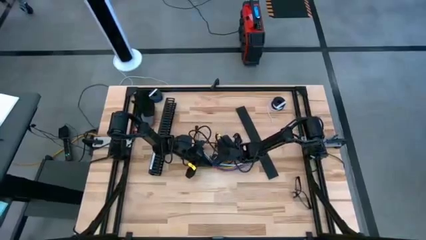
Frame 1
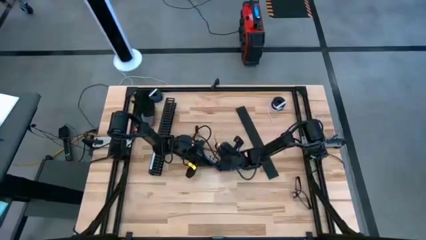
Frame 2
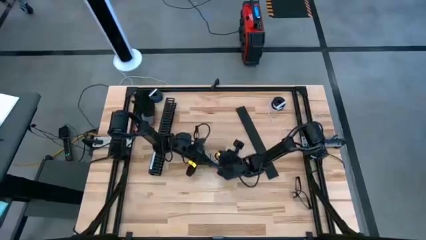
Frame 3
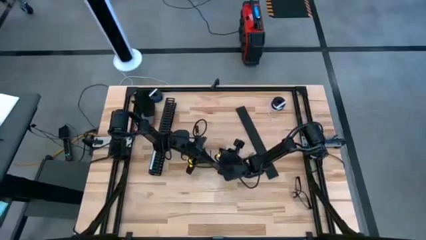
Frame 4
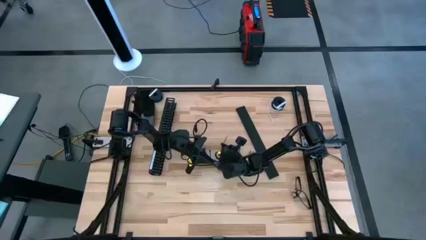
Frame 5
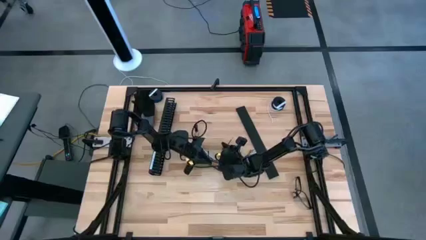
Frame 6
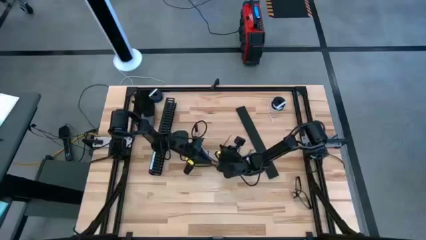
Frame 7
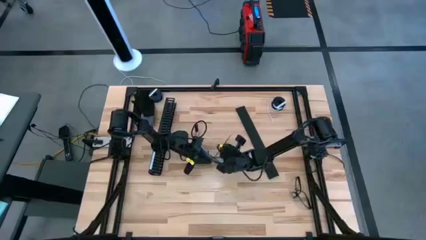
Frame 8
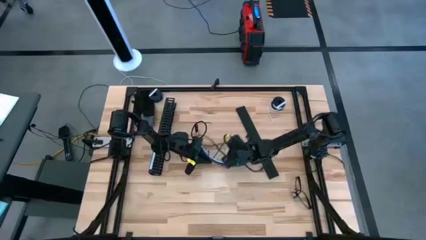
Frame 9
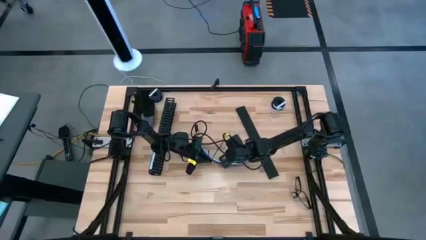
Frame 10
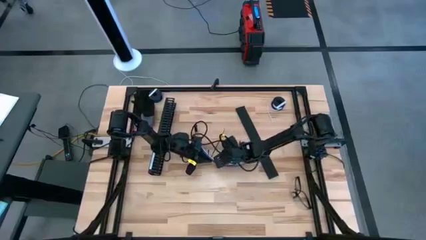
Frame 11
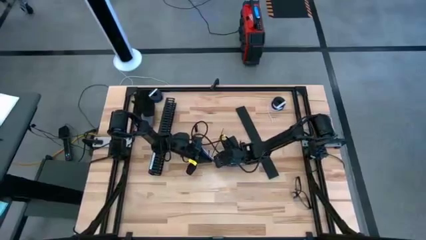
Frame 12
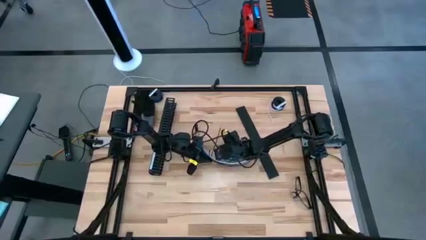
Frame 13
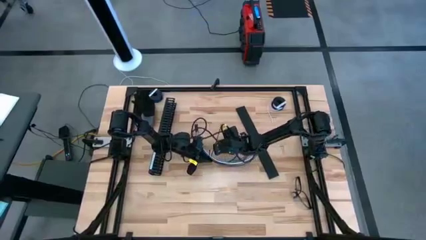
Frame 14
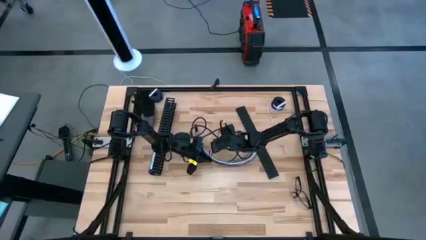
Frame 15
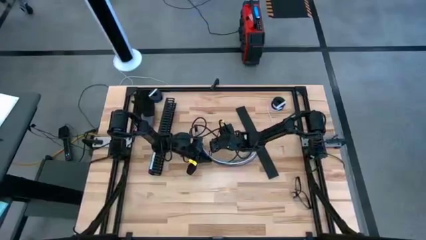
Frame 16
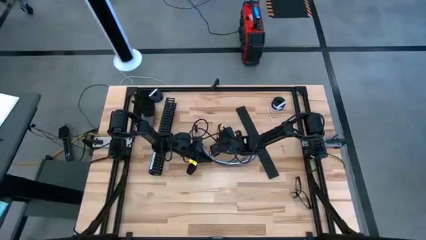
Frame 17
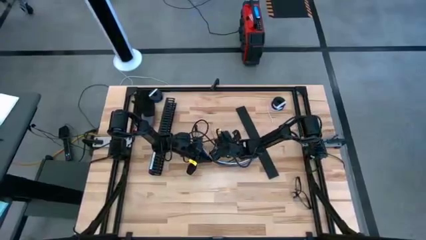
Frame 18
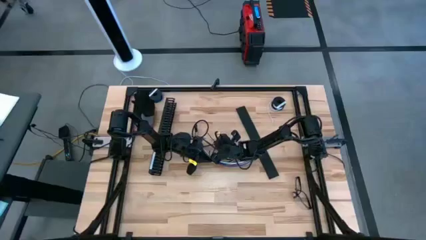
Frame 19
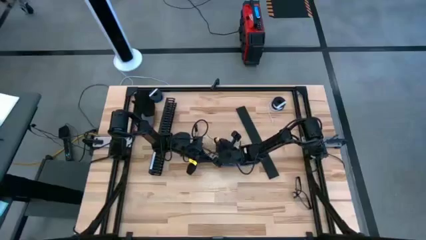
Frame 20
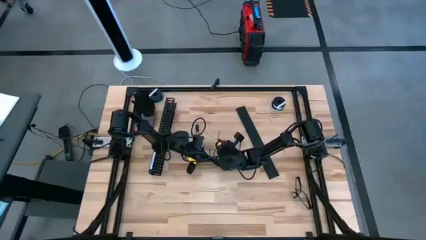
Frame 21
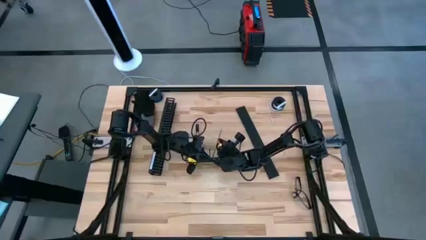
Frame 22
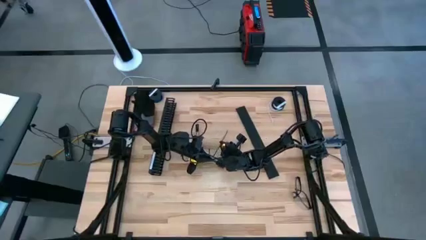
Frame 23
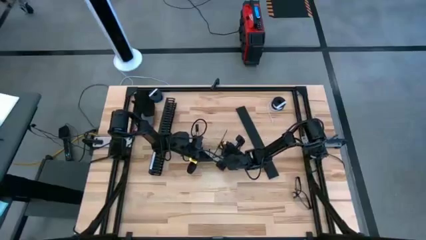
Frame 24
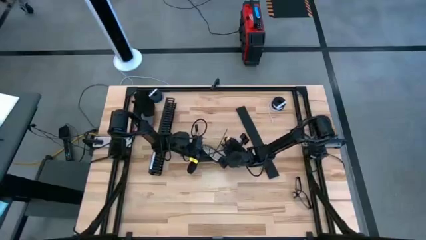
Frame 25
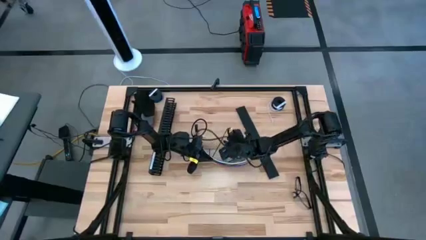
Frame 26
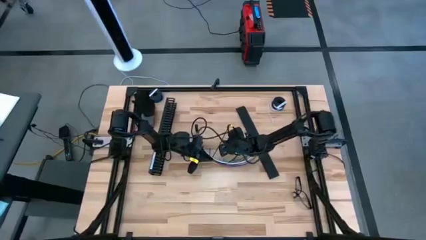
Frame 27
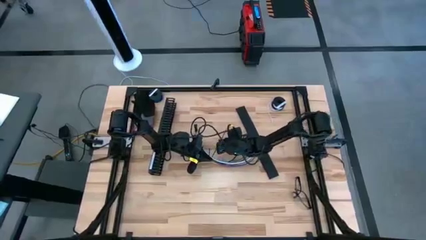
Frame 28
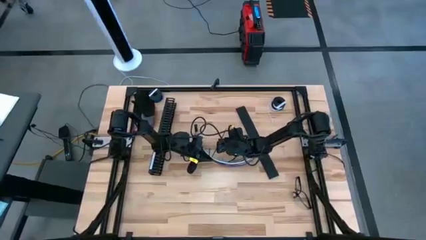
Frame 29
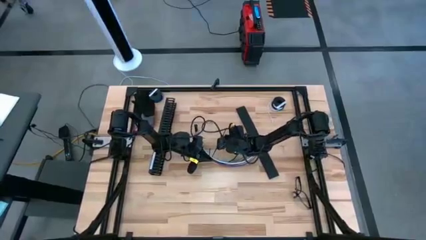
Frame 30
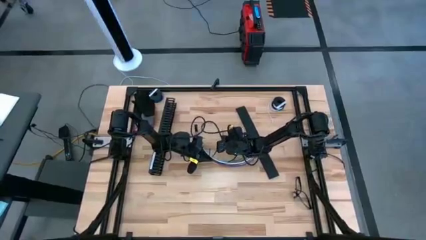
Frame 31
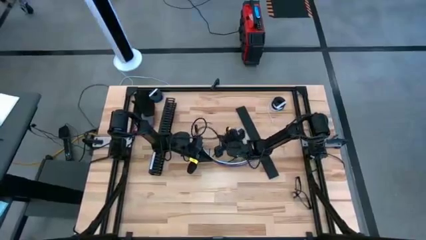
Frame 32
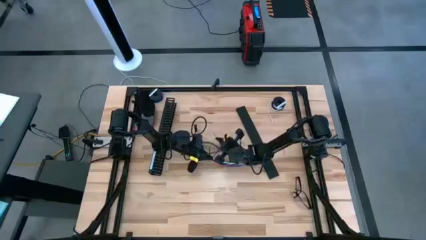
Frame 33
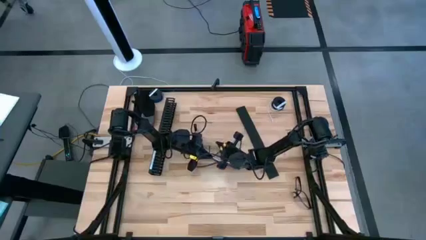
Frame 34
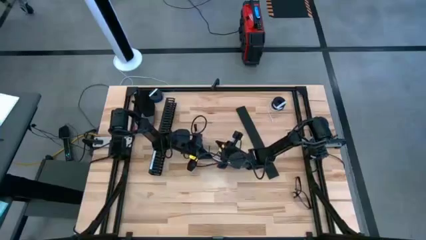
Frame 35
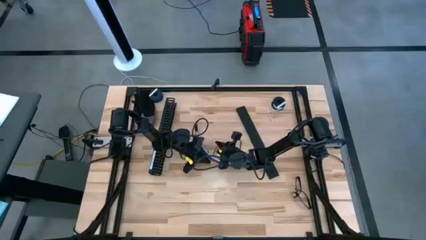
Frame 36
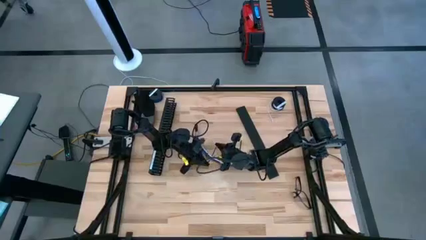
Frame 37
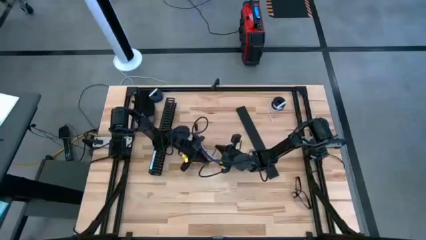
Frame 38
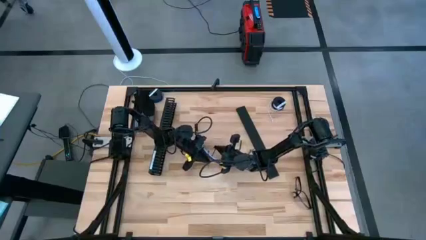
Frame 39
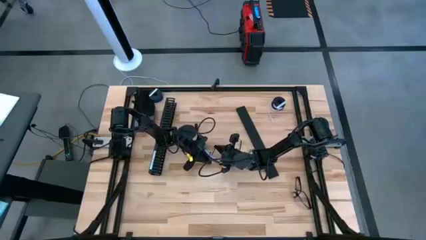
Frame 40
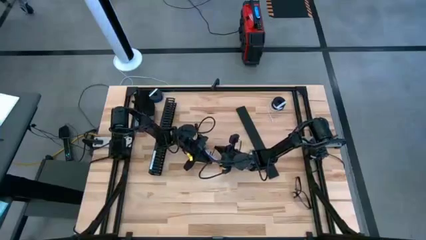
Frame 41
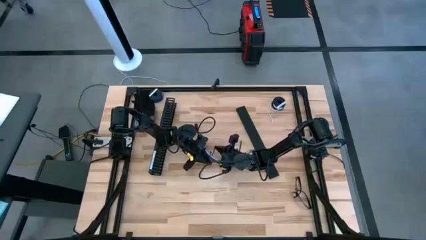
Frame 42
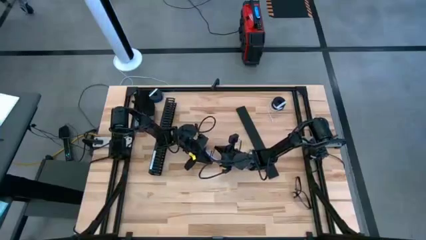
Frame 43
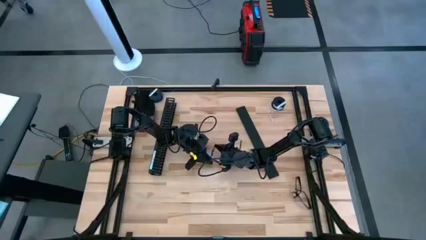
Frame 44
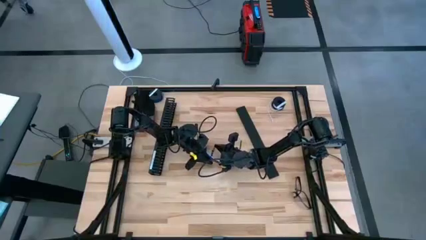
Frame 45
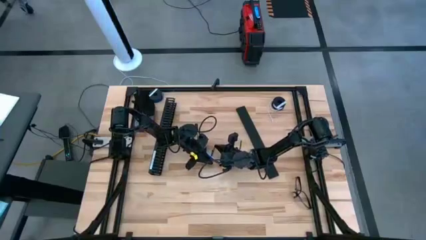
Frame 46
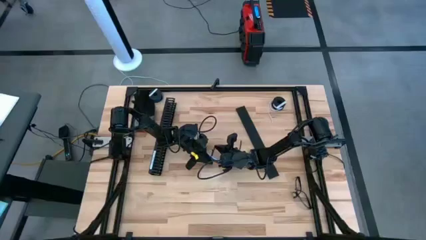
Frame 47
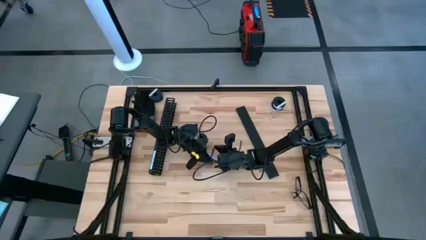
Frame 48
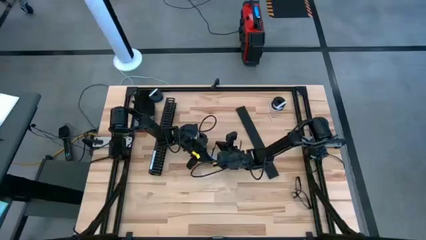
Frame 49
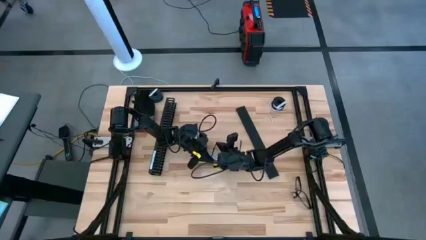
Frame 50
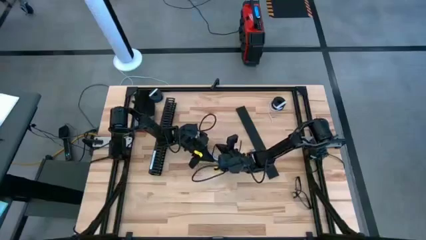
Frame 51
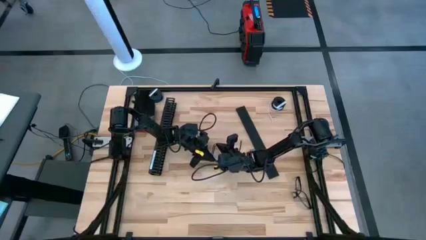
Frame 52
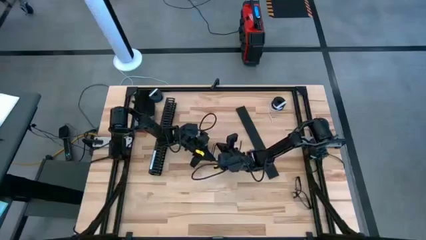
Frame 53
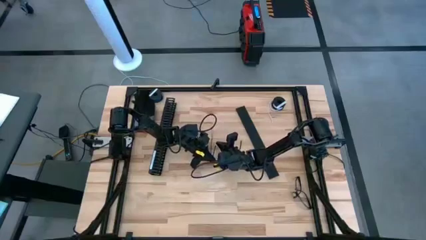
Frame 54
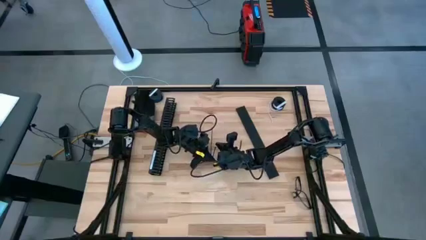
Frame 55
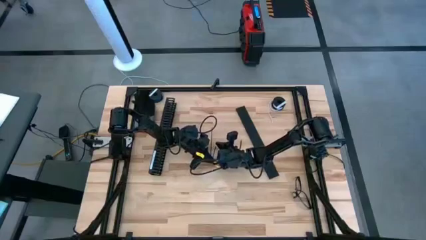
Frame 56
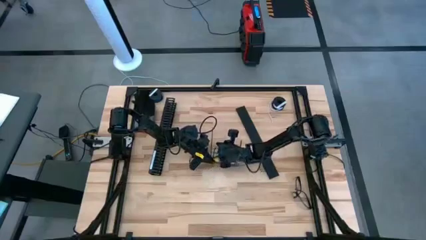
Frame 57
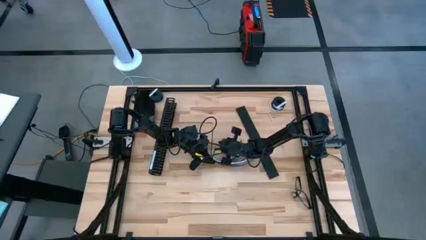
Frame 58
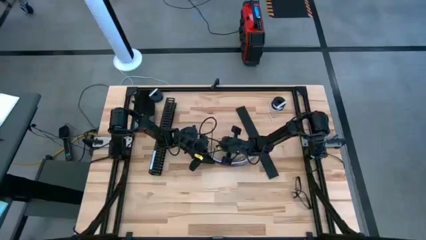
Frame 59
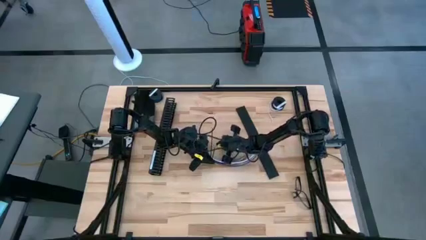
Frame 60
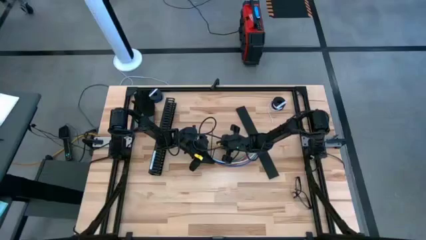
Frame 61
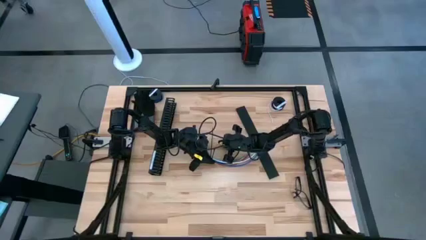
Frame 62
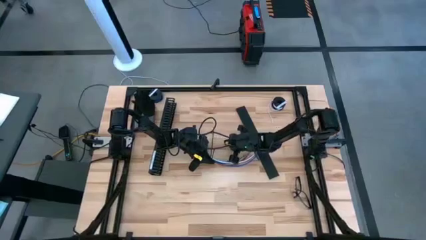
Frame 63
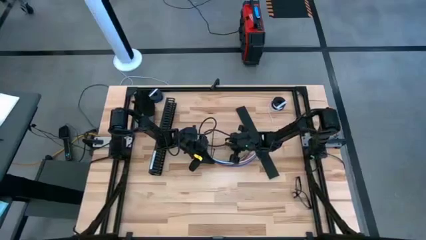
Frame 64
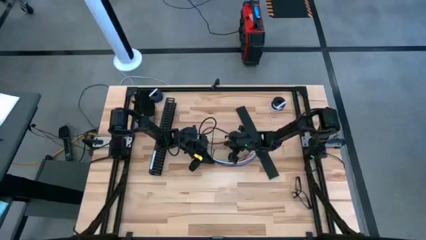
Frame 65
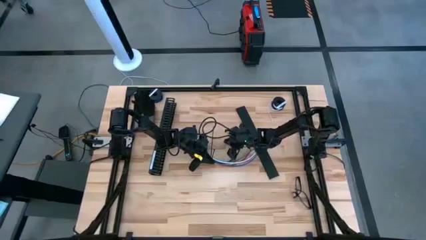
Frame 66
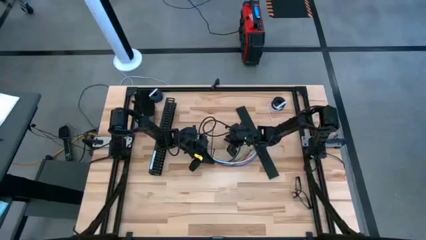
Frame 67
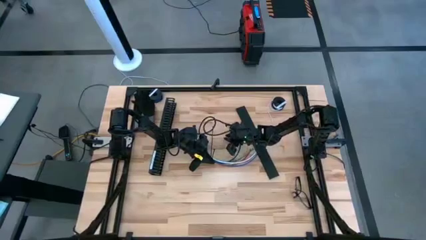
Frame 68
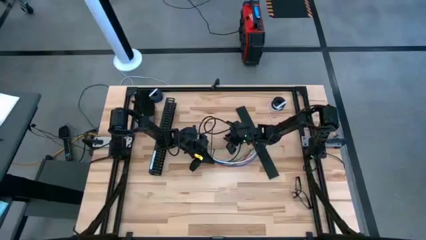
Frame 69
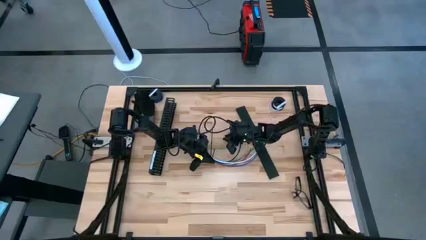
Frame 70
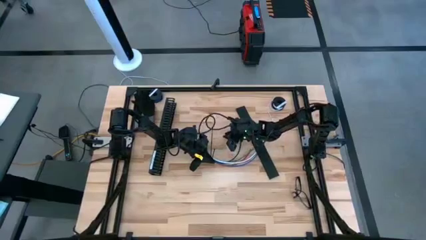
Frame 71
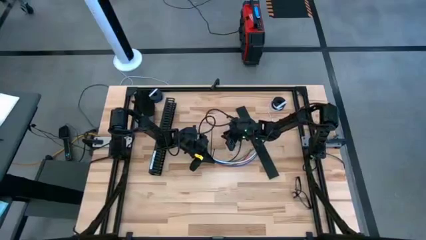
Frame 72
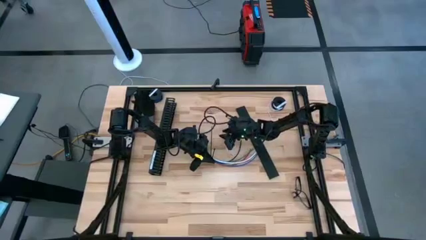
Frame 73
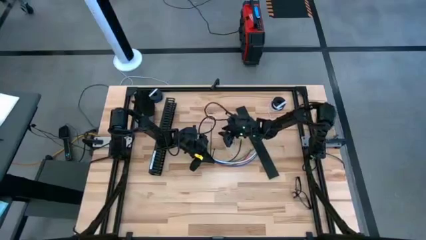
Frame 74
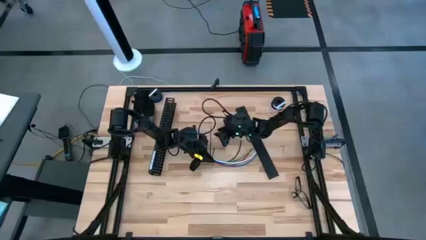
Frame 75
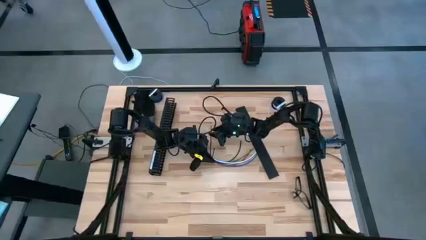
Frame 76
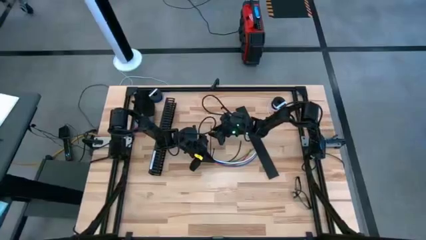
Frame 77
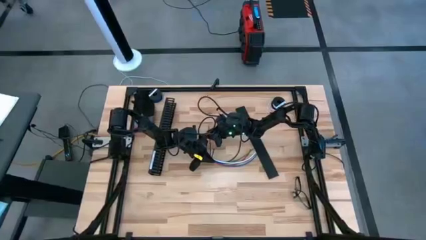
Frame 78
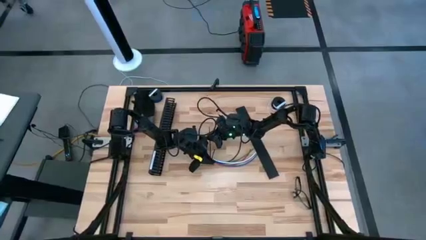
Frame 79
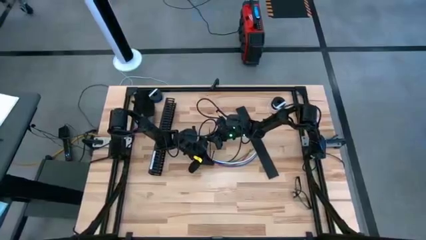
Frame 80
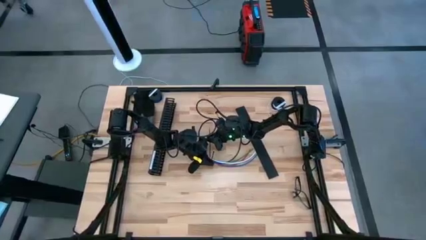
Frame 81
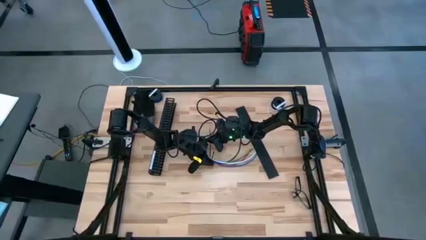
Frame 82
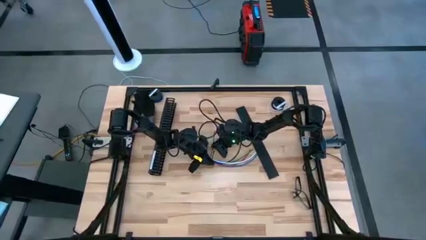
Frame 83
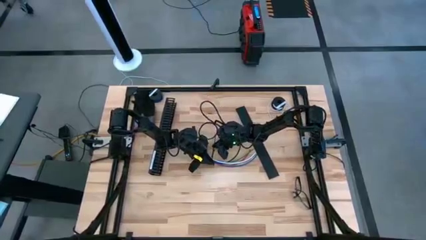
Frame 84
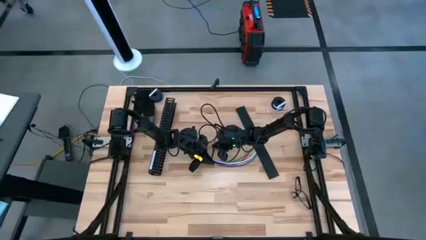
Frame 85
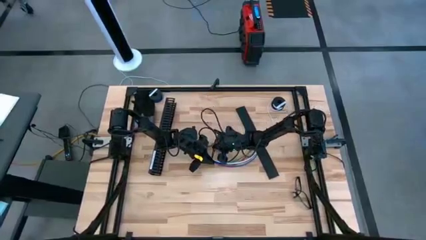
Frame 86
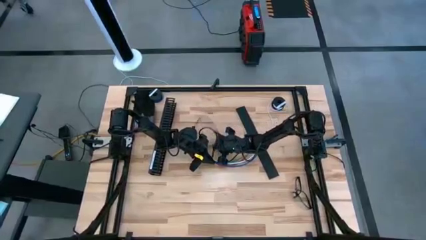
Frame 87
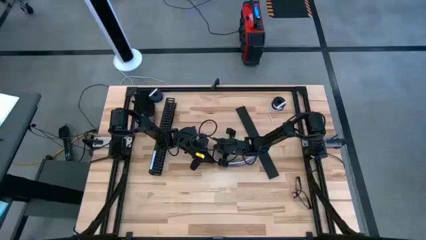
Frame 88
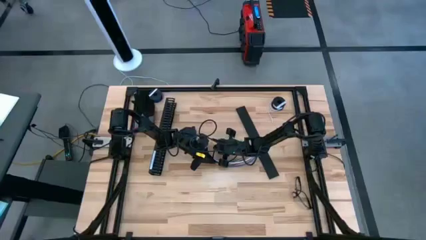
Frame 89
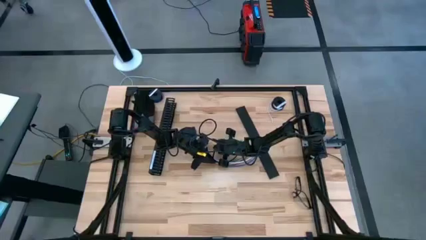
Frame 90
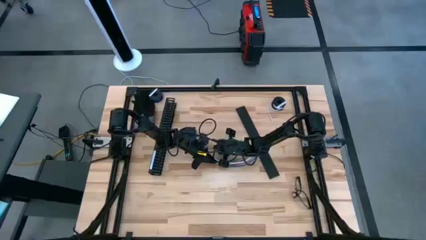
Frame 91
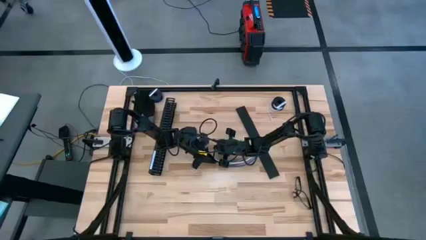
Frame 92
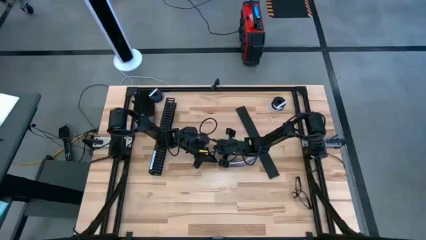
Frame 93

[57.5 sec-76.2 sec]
Task: Ziptie cables
Wrap the black zip tie on the cable
